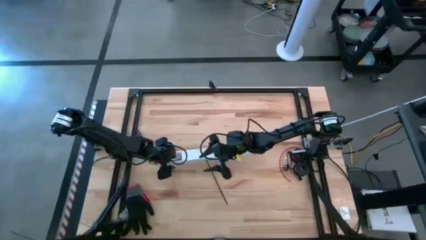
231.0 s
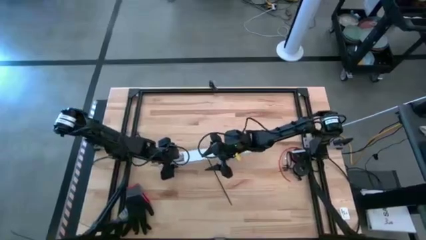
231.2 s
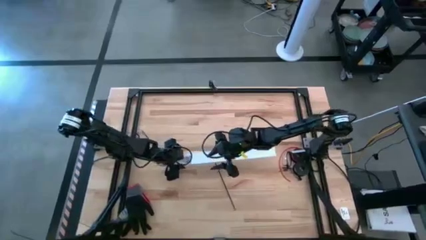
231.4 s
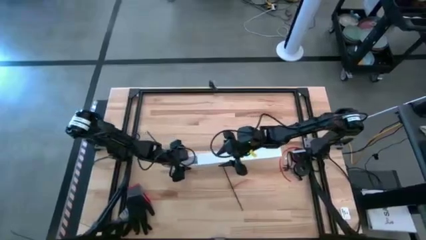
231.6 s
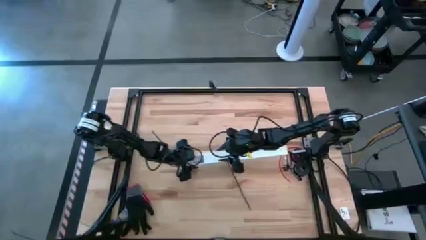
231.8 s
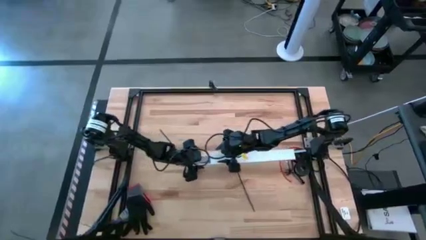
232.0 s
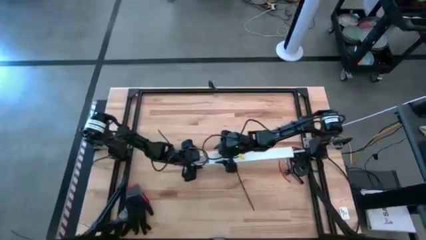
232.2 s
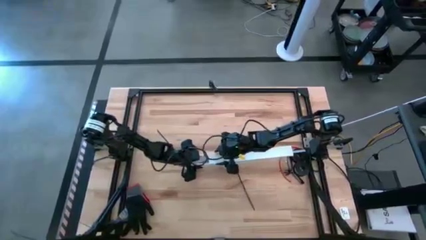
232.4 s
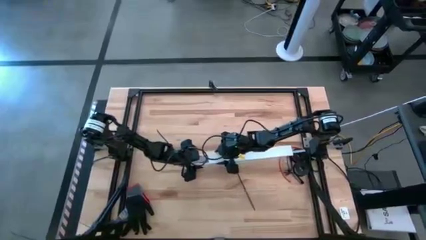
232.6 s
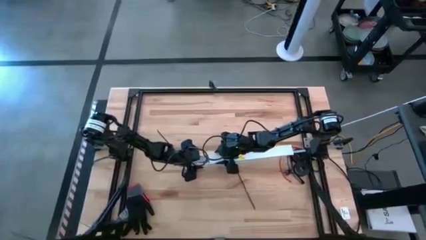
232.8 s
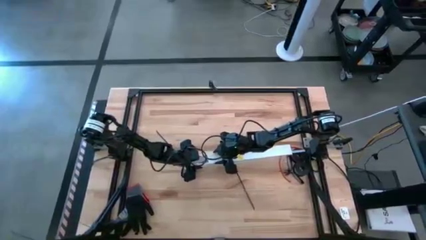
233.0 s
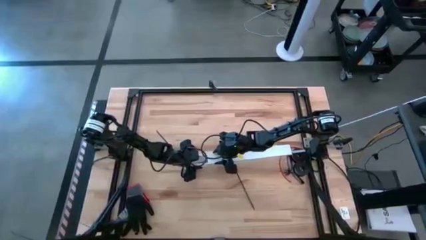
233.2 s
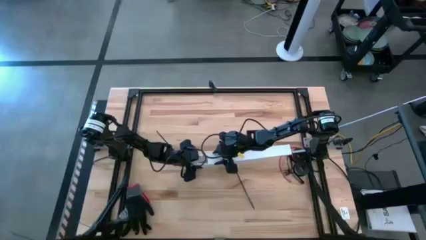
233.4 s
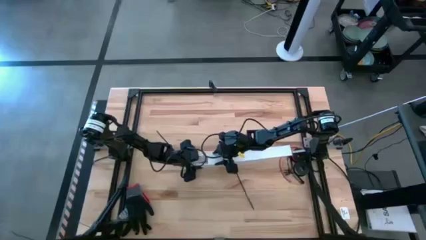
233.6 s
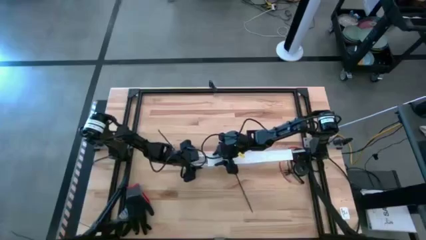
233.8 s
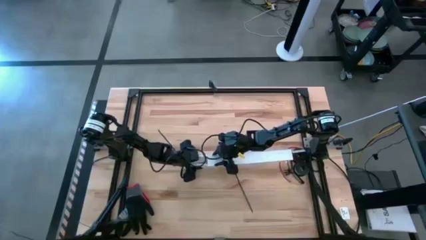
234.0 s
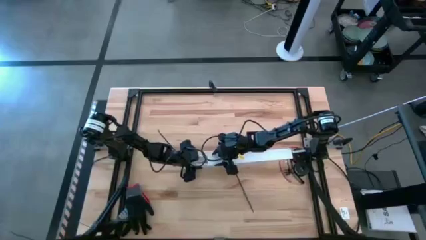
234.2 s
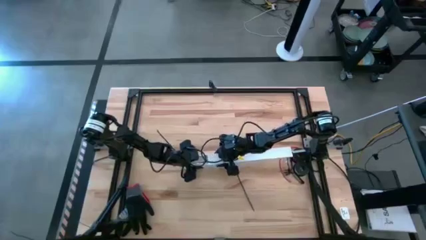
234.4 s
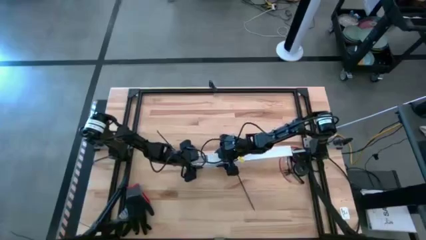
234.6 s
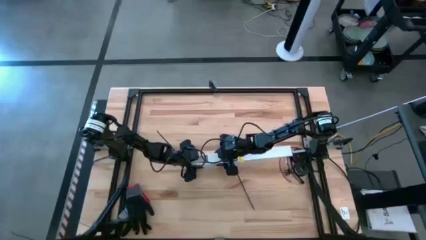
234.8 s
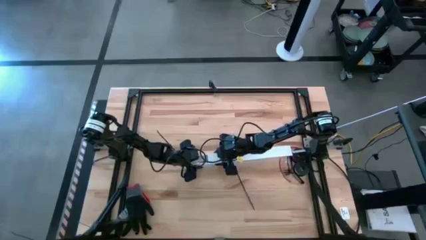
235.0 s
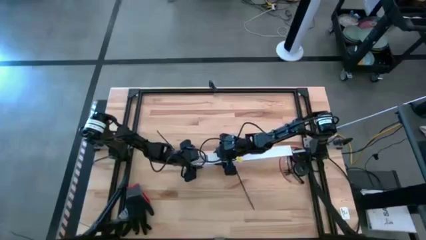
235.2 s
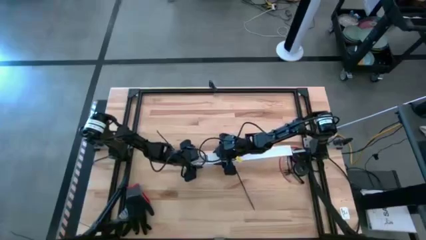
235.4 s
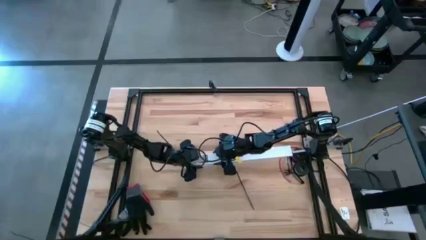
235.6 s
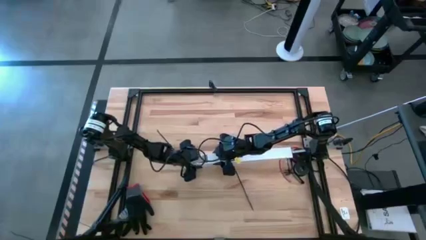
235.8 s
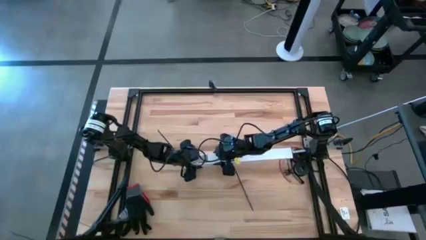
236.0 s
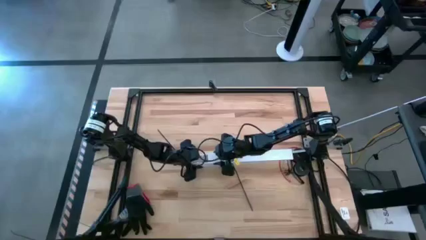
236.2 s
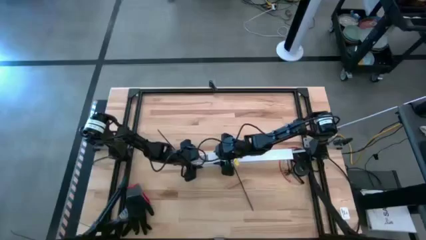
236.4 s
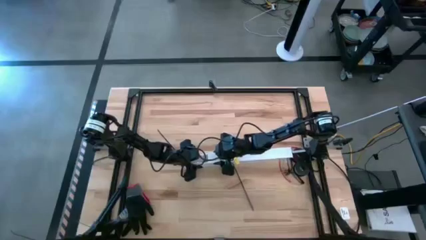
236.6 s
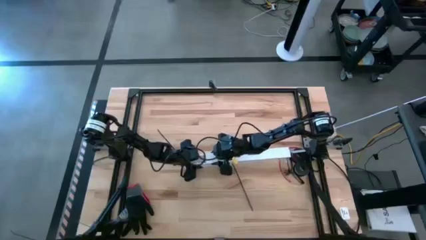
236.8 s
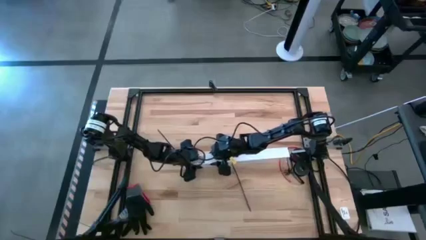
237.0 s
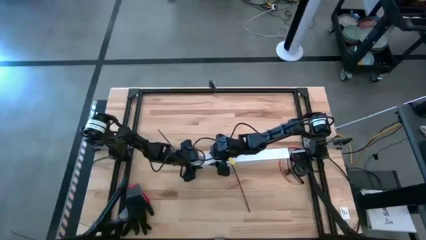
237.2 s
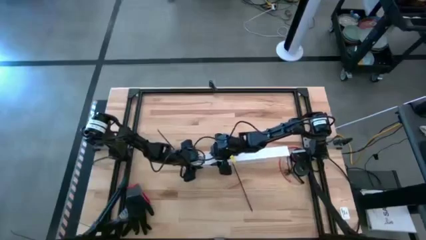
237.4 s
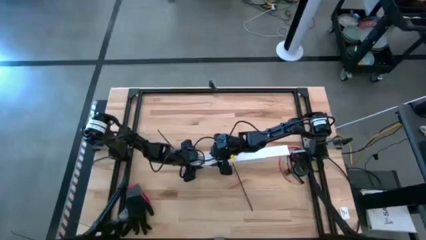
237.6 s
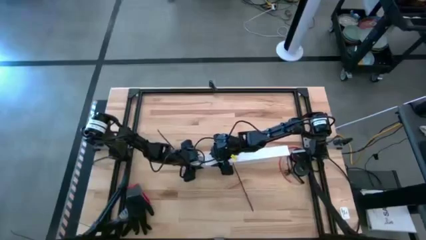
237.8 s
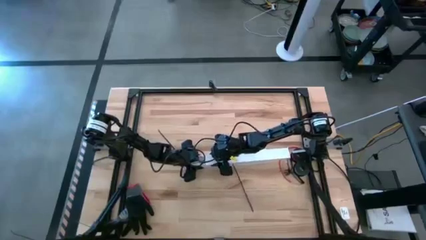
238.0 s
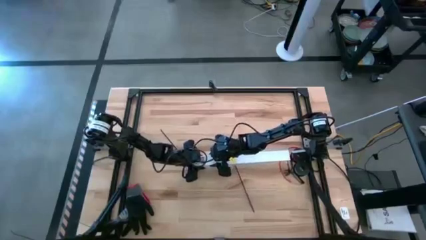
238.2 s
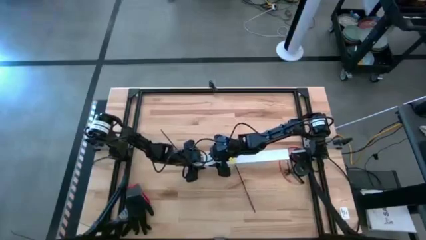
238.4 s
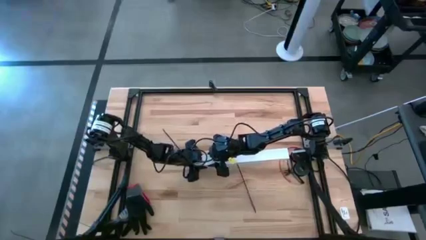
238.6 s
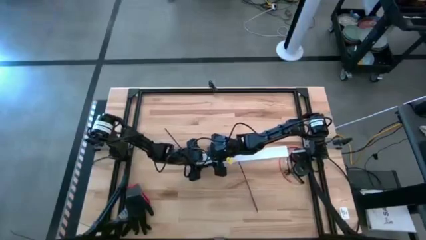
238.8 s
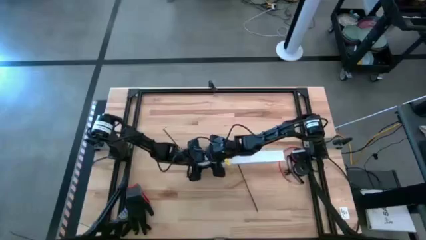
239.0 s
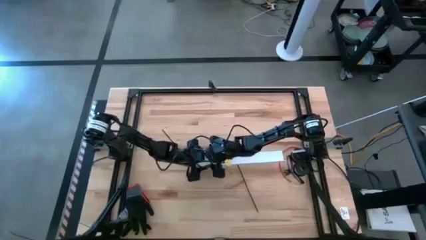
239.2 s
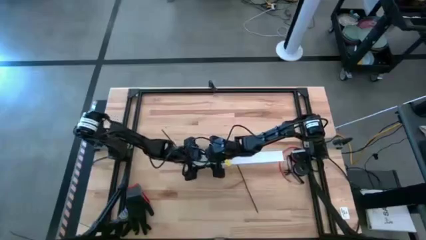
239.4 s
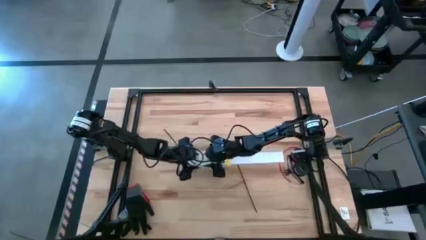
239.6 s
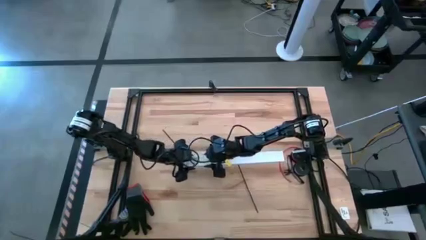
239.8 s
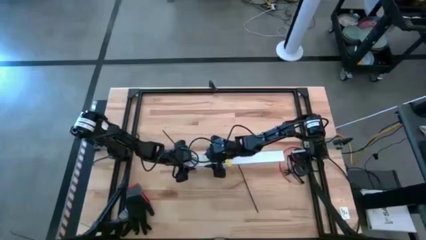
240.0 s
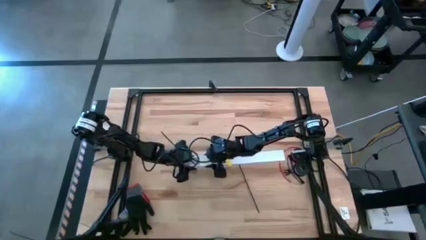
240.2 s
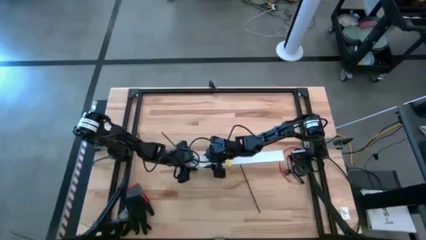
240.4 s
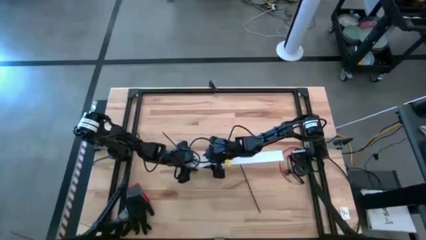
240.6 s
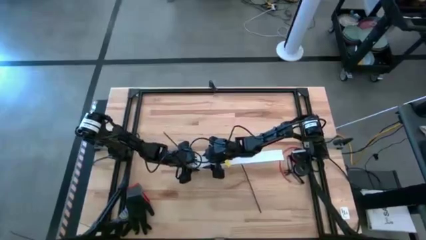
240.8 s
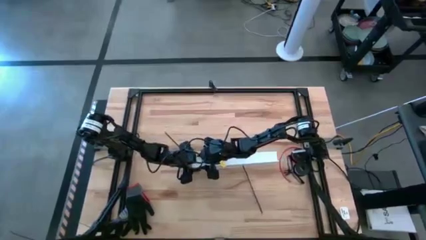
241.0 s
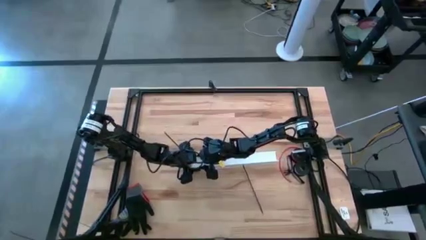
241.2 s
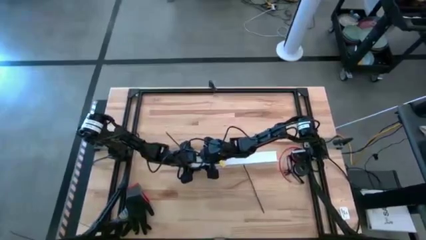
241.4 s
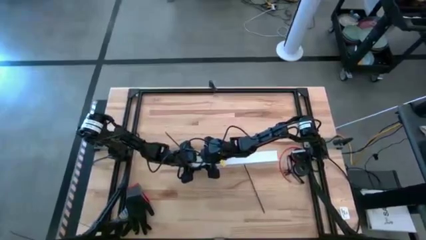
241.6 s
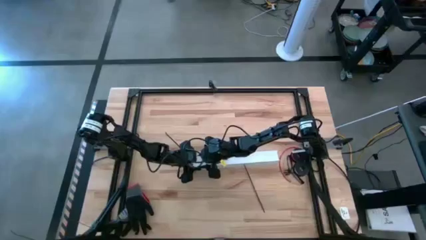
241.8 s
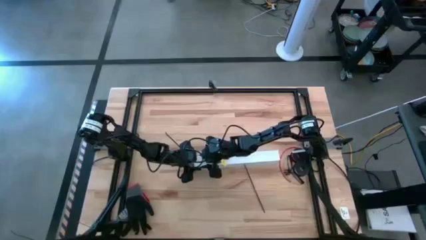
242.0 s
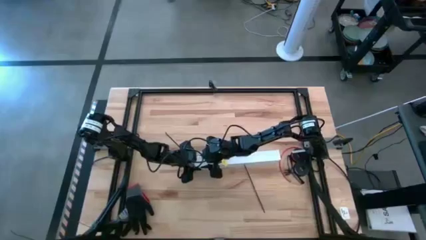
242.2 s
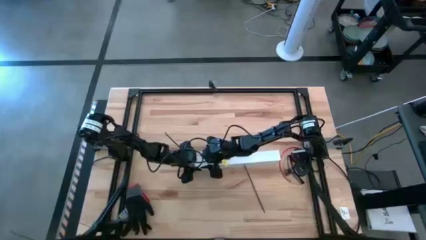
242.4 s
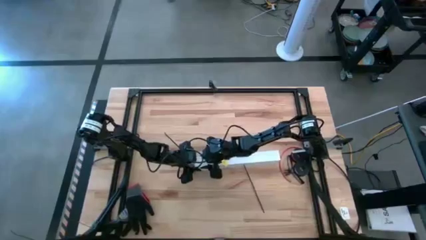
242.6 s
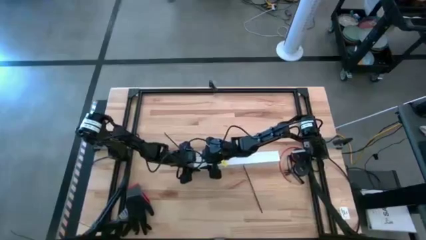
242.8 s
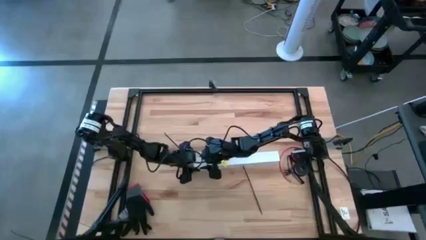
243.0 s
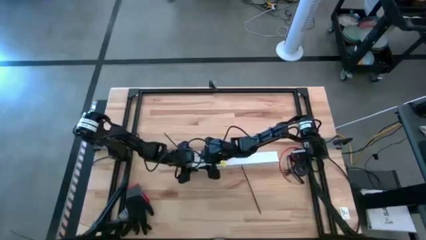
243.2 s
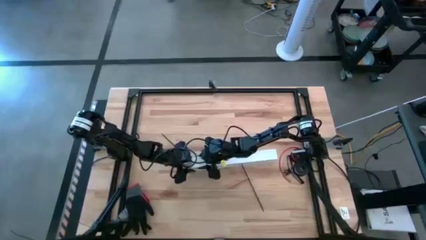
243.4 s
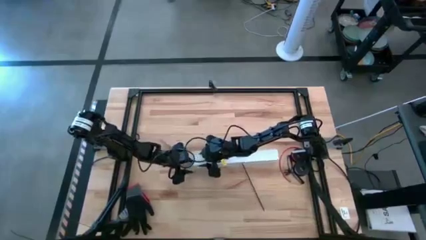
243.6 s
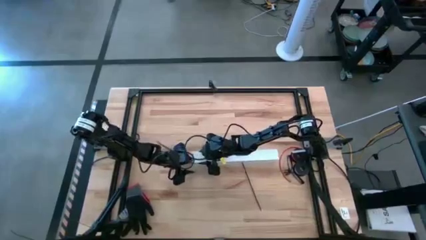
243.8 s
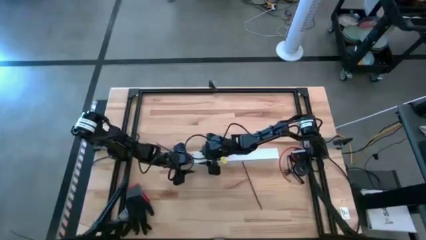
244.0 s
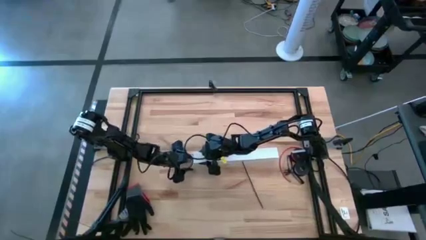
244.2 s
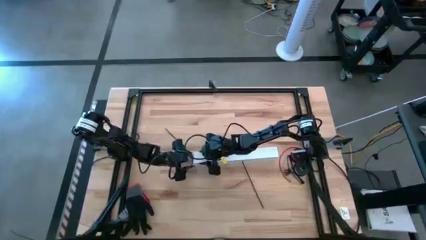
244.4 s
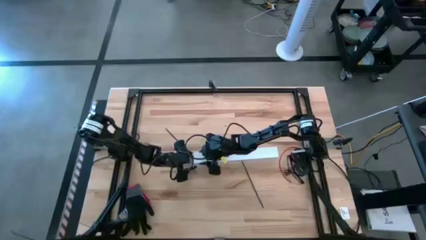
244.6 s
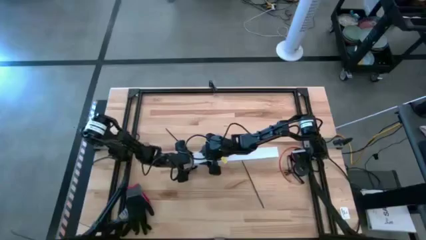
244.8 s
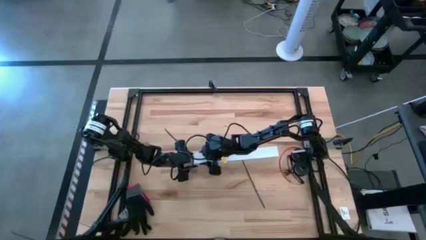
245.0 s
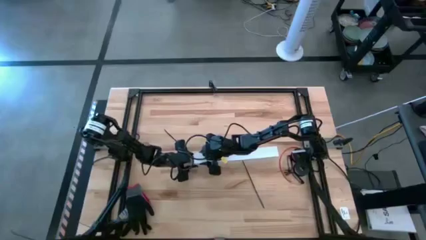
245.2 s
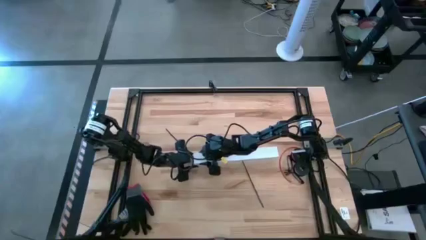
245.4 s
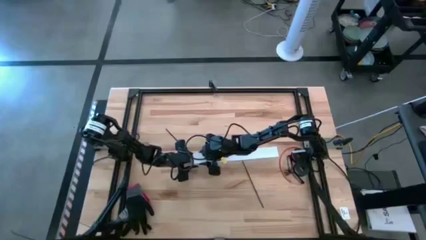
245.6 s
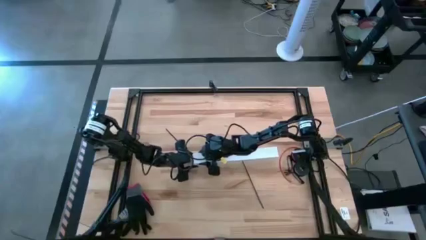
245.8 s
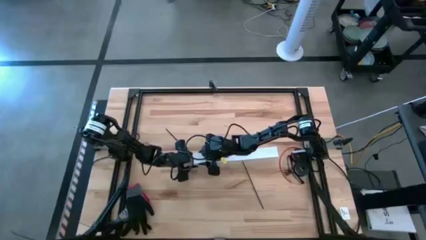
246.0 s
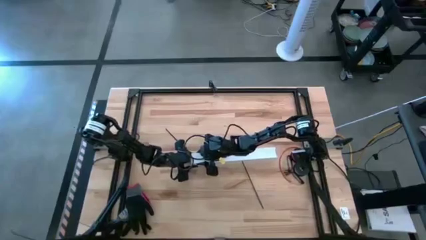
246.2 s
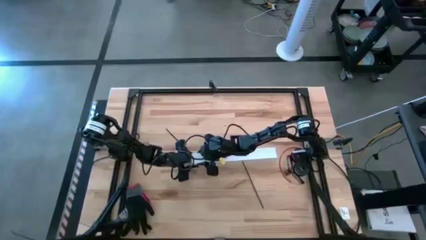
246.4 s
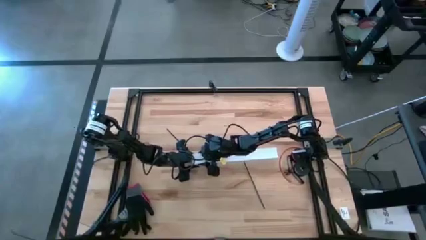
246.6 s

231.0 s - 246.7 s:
Task: Ziptie cables
Close the white cable duct

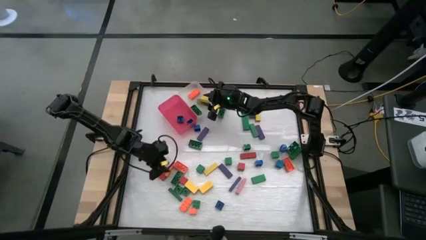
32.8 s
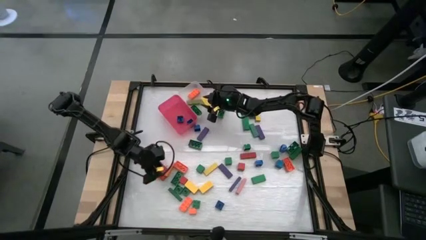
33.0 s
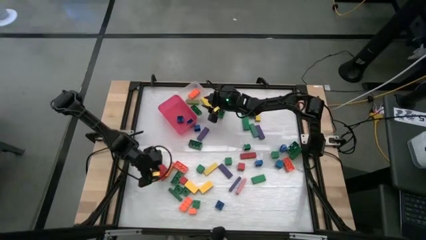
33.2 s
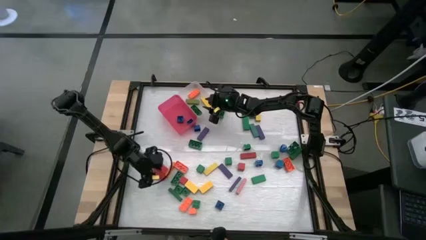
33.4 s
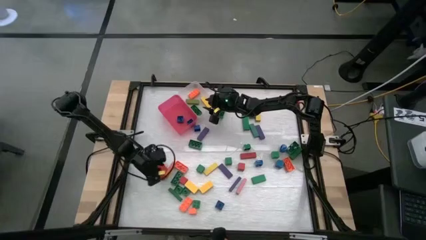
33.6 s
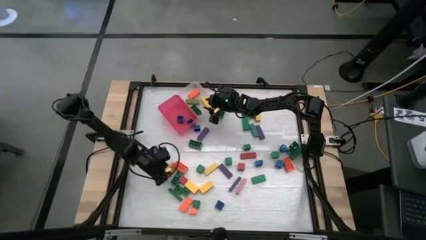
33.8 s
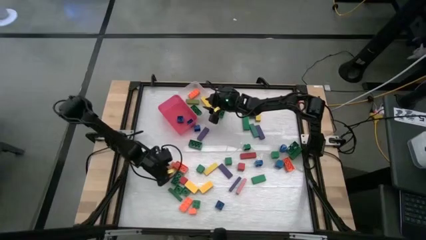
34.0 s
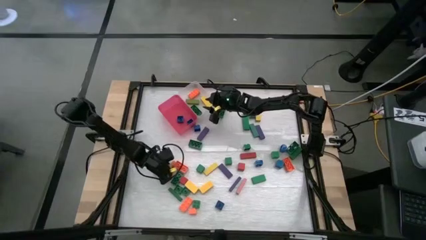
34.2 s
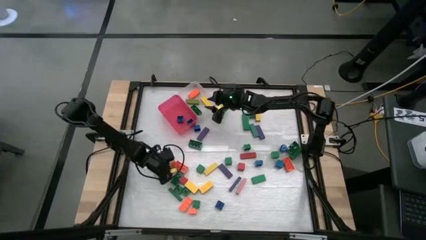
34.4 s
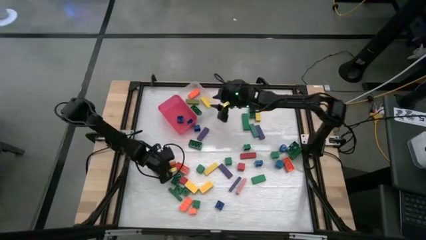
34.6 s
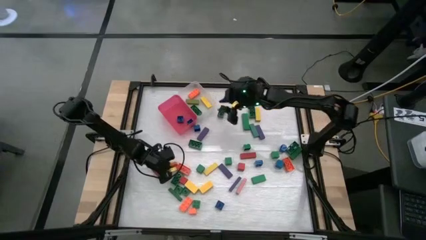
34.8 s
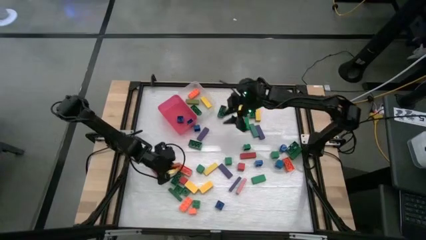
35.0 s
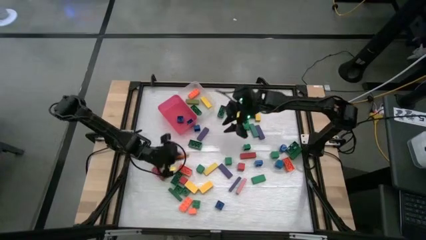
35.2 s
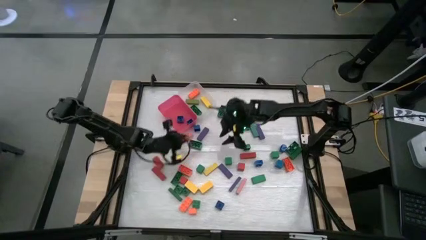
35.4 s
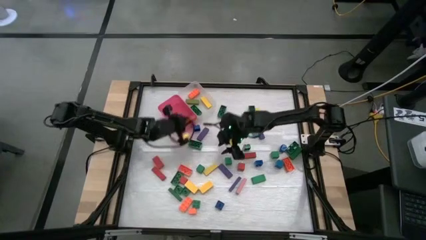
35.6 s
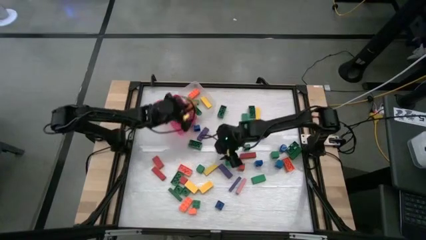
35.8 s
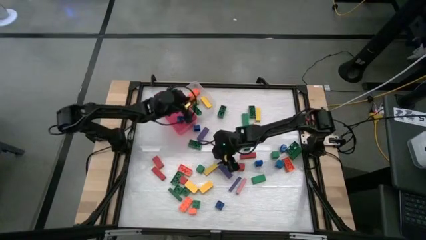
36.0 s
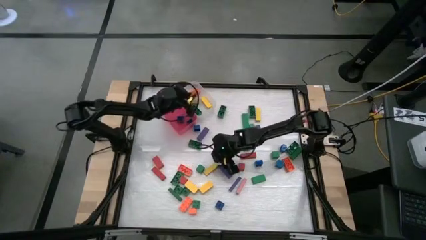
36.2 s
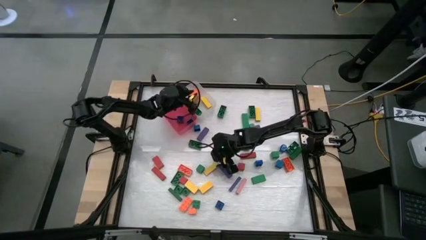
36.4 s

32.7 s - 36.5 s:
Task: Sort blocks by size
Put the big orange block into the white bin
